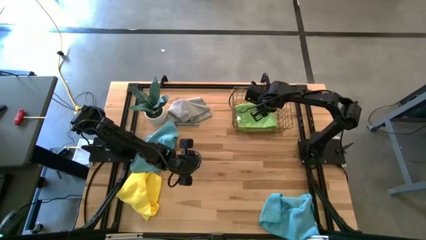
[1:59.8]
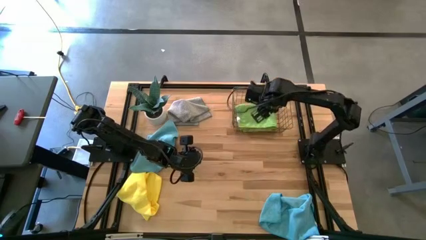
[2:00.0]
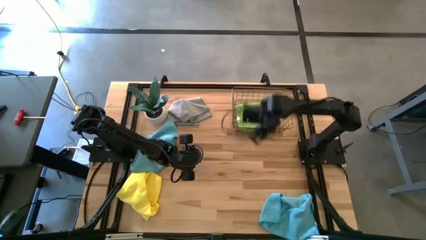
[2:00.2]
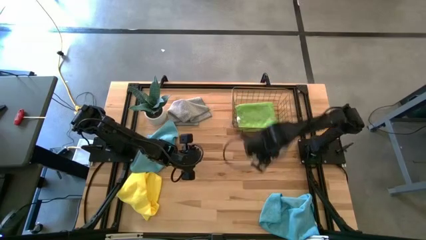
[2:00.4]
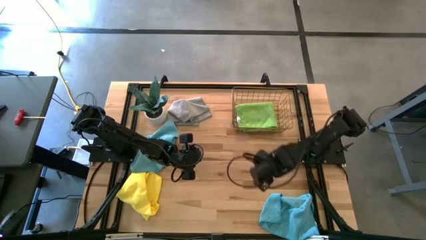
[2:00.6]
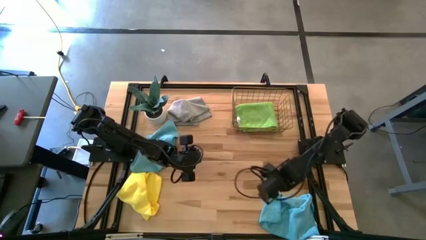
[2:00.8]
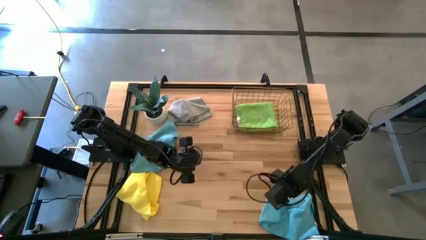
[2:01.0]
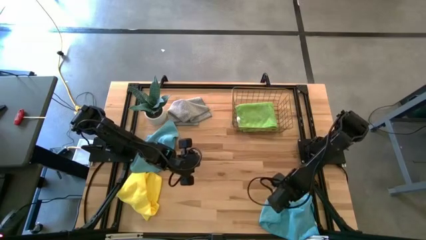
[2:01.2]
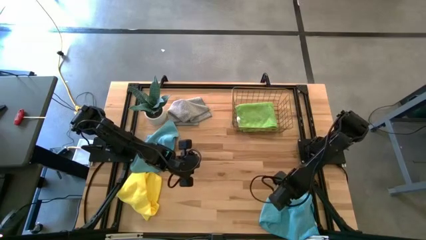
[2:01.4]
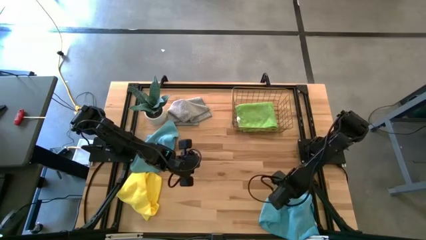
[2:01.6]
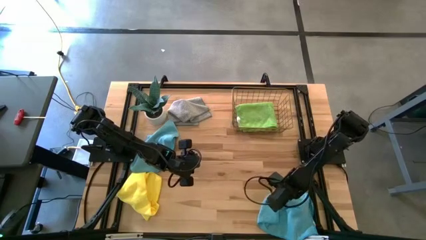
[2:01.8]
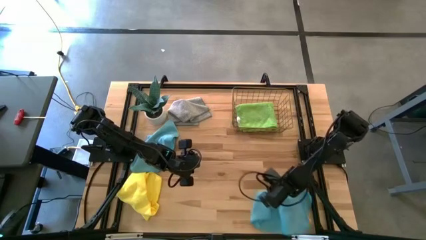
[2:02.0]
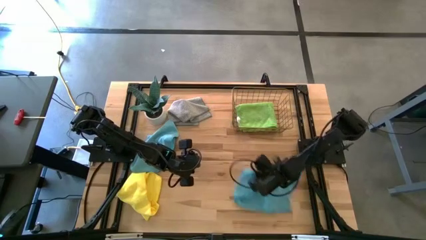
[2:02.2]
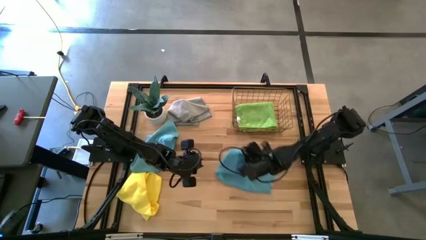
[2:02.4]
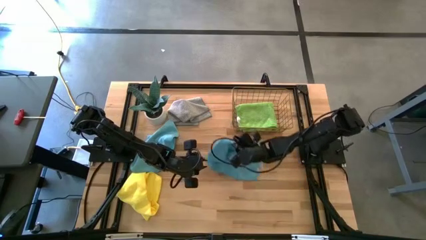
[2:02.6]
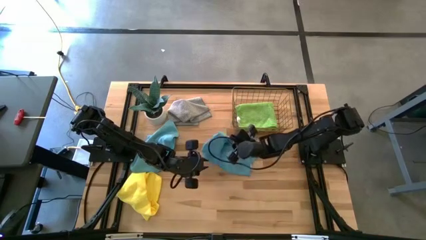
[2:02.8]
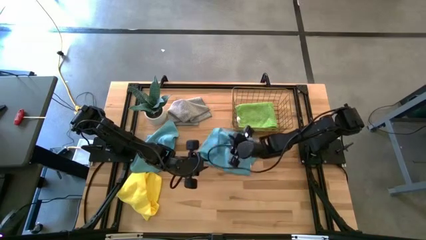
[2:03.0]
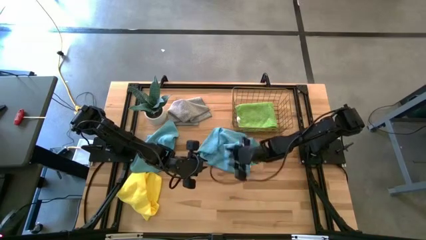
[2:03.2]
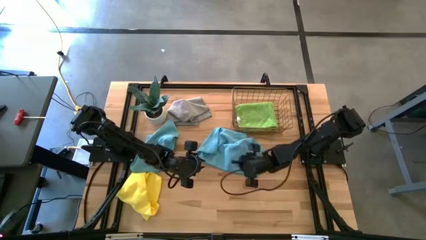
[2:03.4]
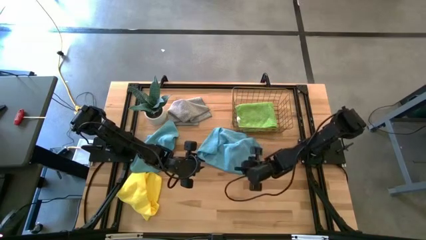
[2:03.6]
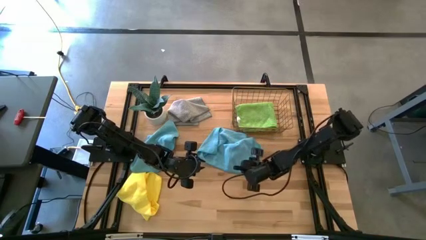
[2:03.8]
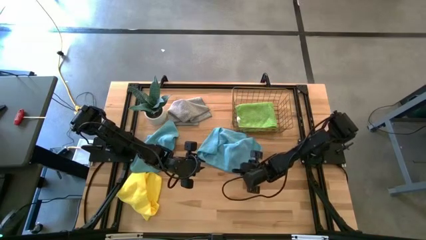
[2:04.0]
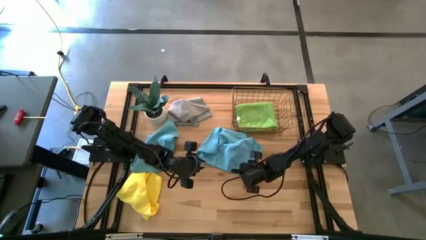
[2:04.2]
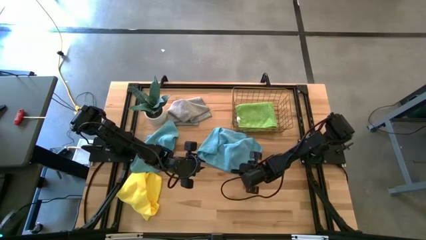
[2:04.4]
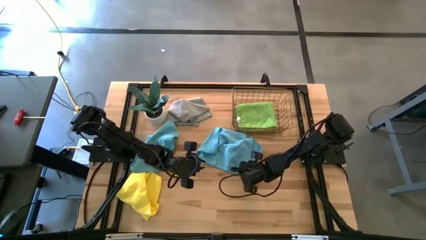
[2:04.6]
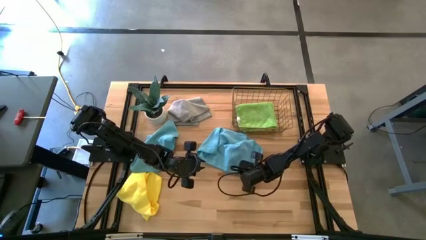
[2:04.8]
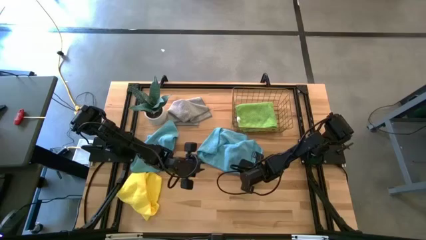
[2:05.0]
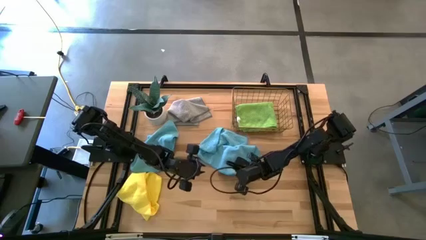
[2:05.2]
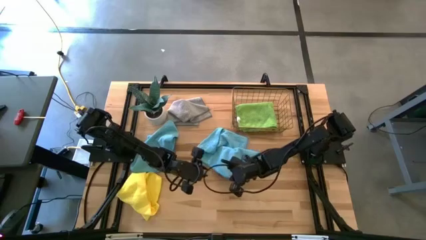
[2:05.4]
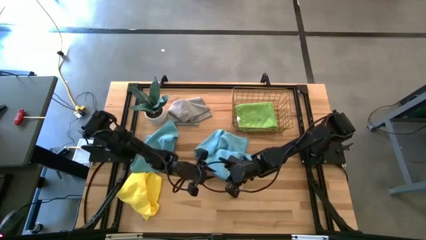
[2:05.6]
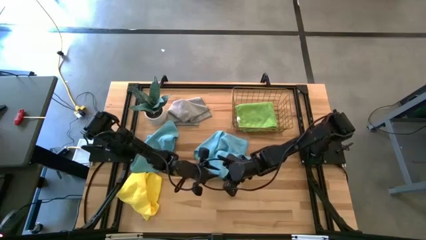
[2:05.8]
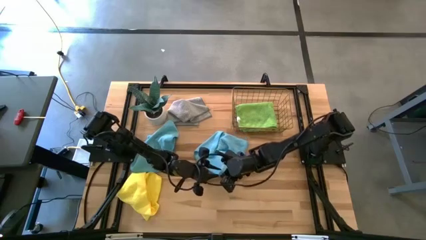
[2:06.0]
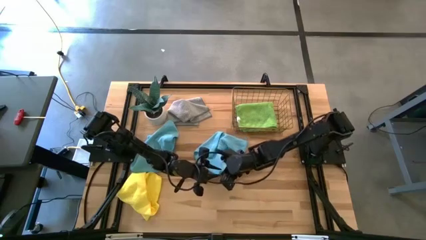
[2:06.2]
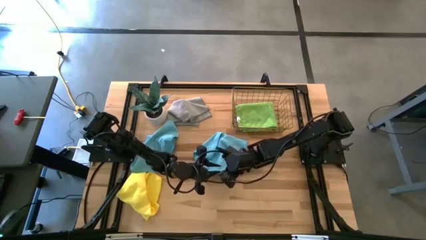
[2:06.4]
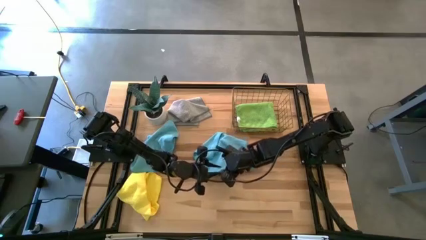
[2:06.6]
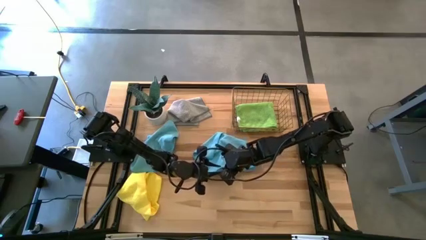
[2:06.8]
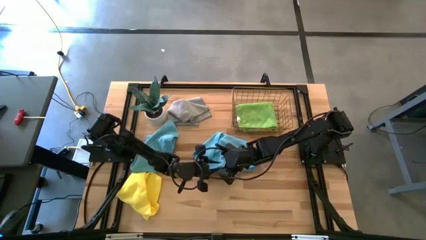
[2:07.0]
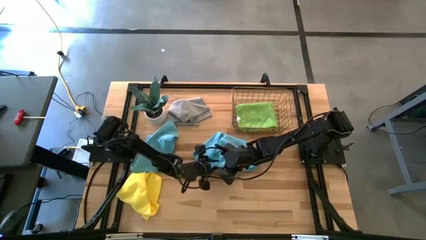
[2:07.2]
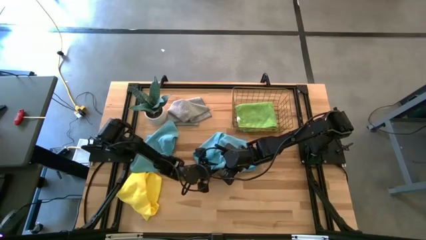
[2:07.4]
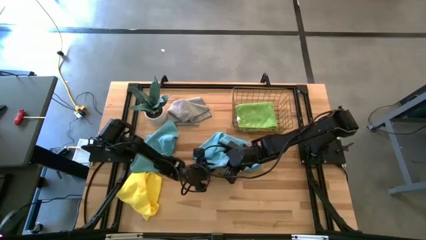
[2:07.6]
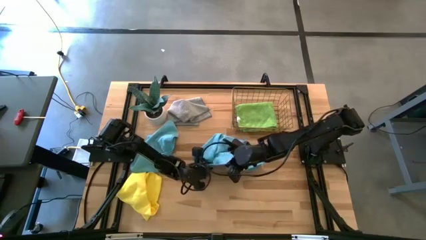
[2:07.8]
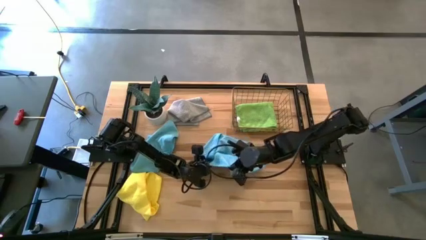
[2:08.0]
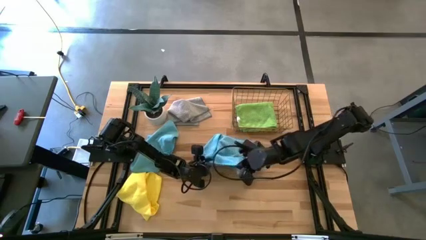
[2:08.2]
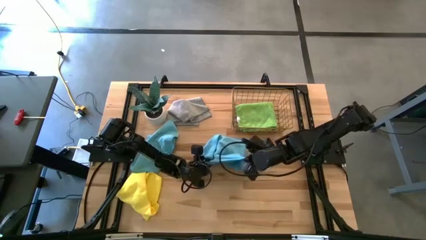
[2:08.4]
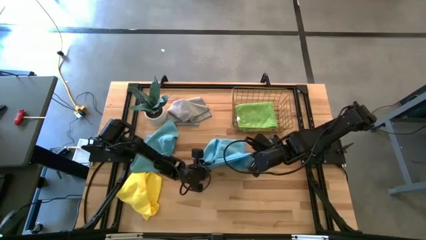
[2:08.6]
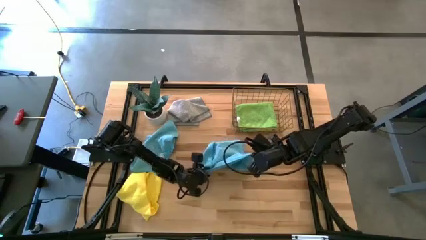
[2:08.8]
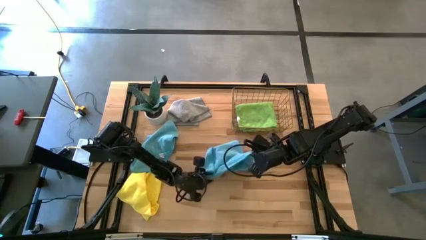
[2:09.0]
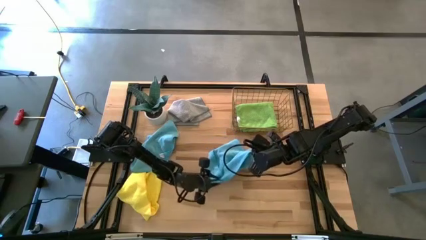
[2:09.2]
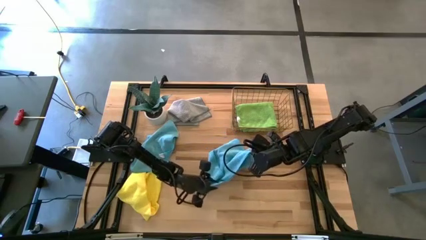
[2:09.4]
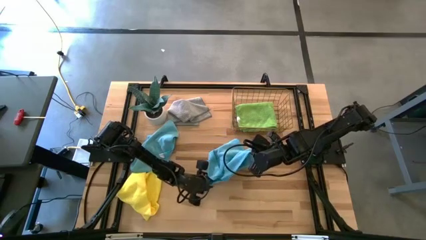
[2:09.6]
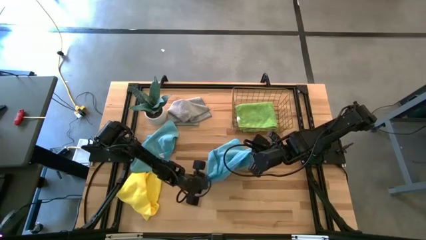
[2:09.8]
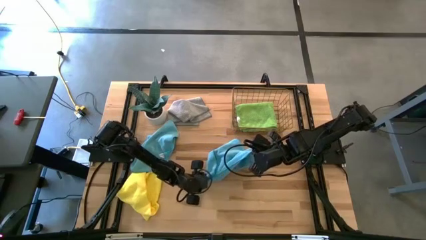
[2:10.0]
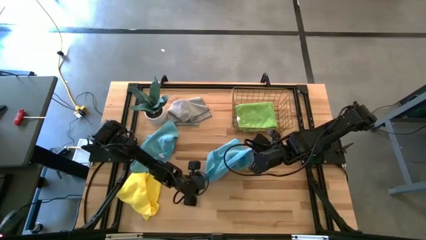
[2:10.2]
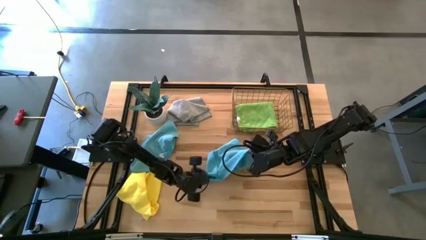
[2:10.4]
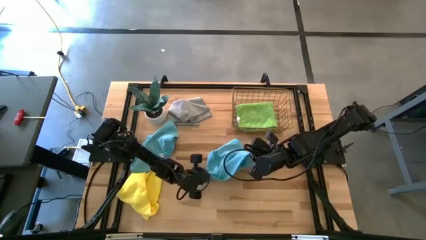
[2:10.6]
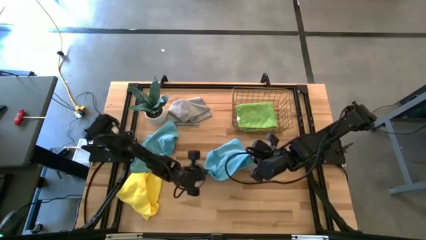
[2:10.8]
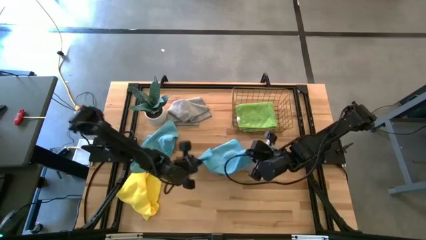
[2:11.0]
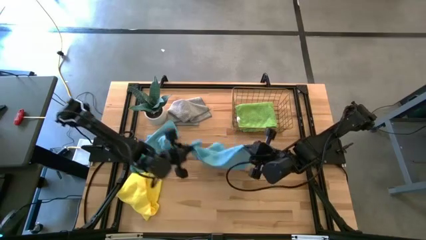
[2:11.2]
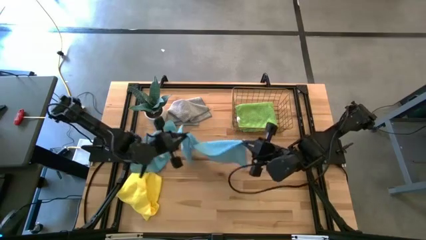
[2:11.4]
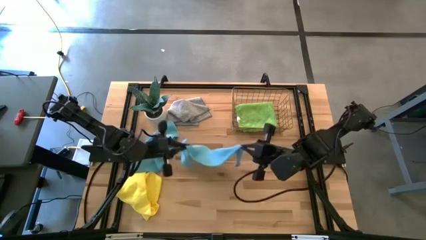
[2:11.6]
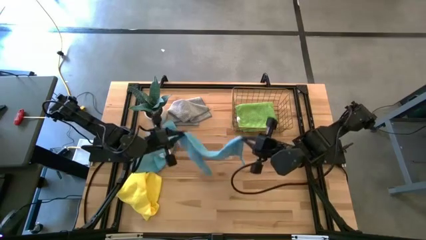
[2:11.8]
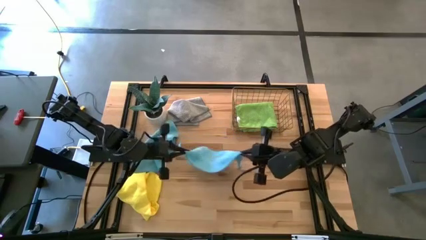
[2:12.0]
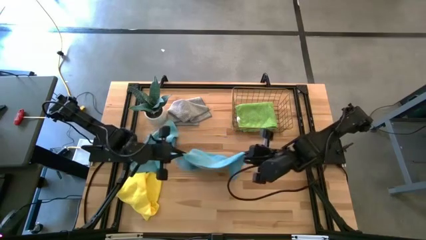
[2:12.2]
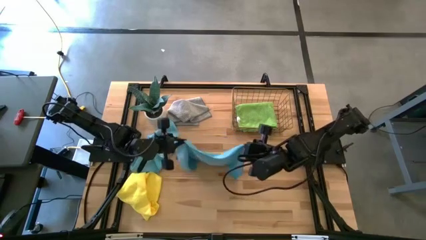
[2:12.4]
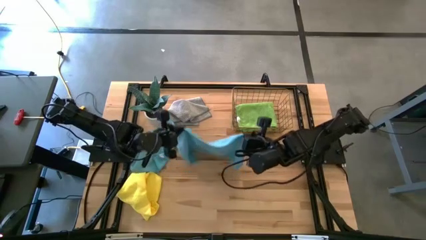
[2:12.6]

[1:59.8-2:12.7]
Task: Fold microfiber towels
Fold the bottom blue microfiber towel
